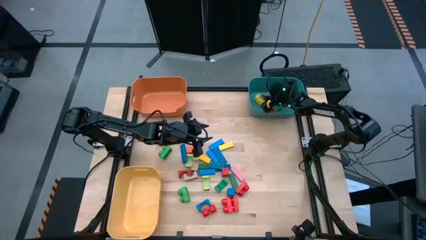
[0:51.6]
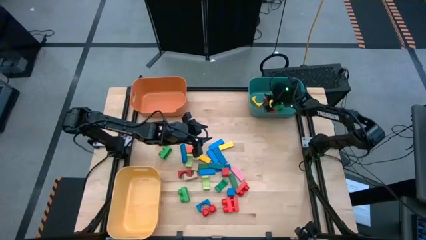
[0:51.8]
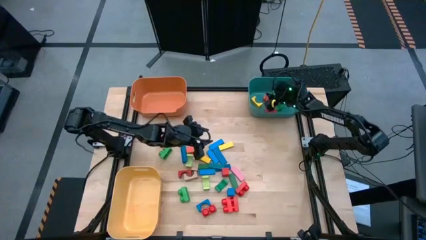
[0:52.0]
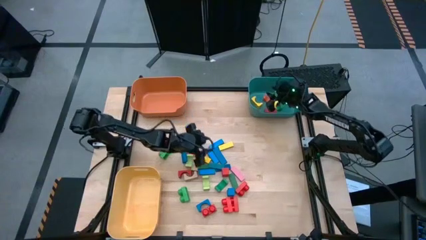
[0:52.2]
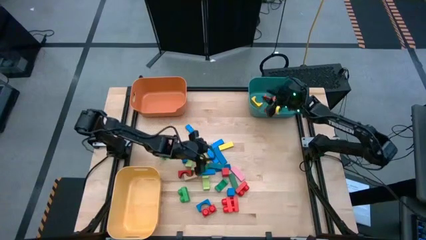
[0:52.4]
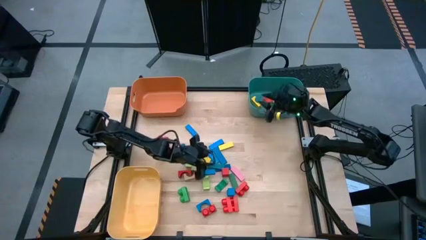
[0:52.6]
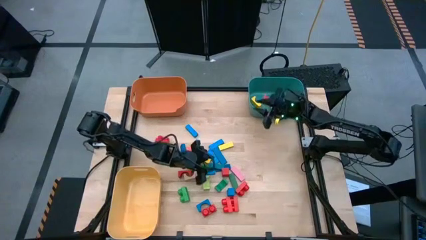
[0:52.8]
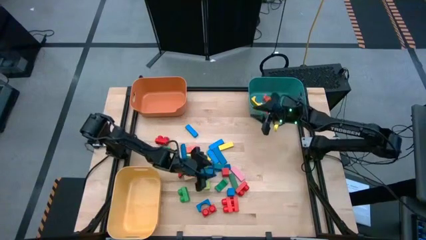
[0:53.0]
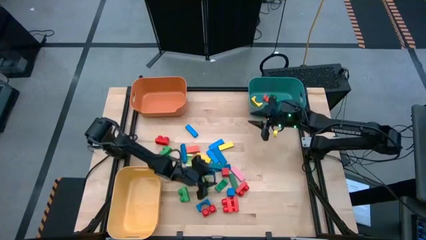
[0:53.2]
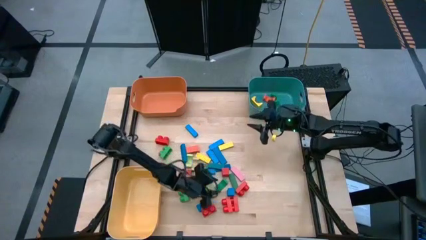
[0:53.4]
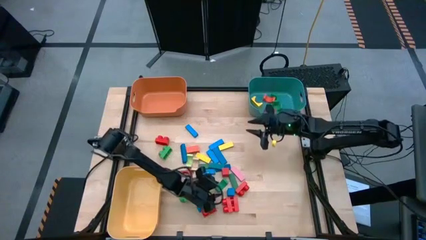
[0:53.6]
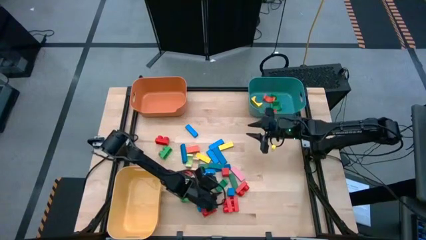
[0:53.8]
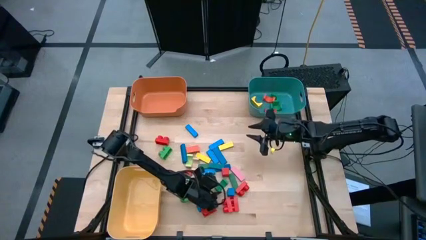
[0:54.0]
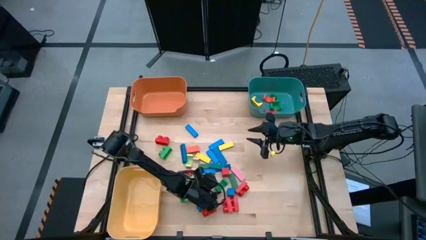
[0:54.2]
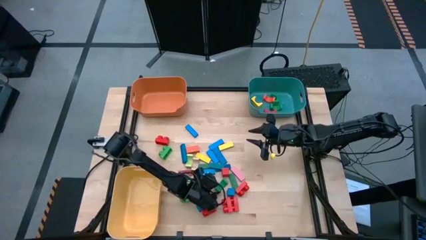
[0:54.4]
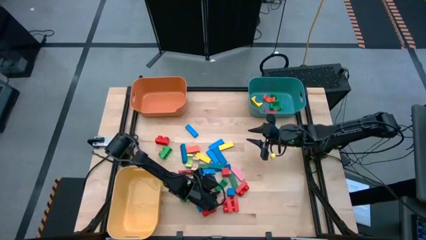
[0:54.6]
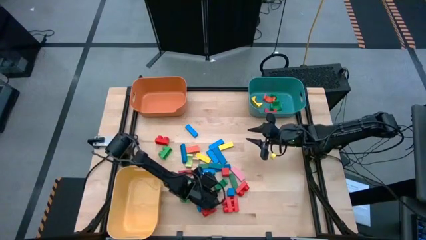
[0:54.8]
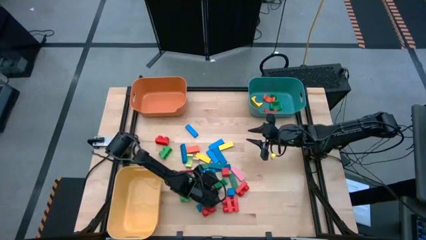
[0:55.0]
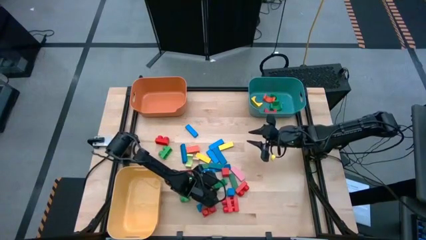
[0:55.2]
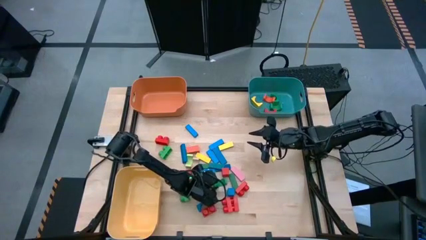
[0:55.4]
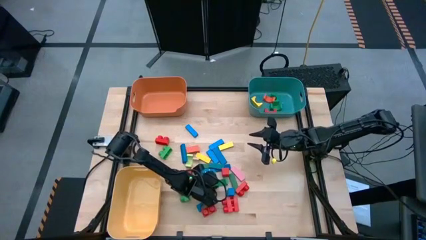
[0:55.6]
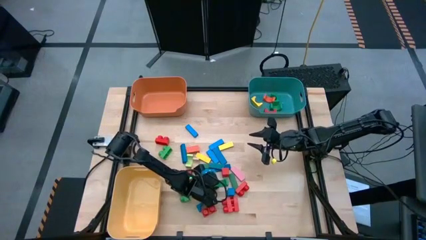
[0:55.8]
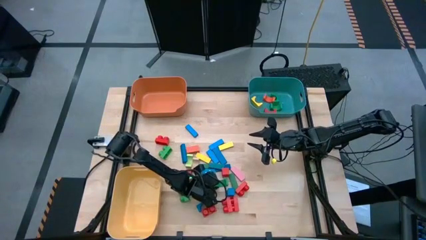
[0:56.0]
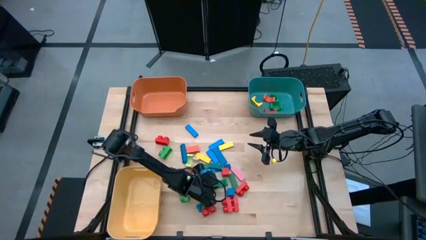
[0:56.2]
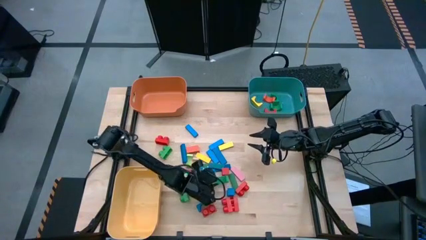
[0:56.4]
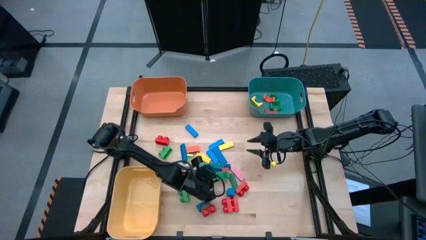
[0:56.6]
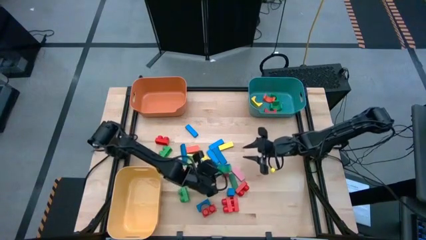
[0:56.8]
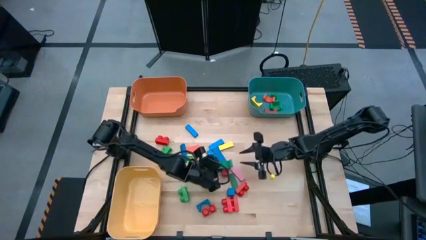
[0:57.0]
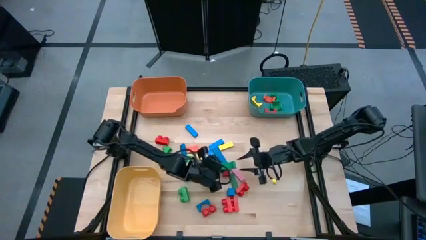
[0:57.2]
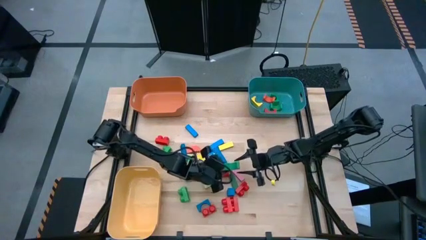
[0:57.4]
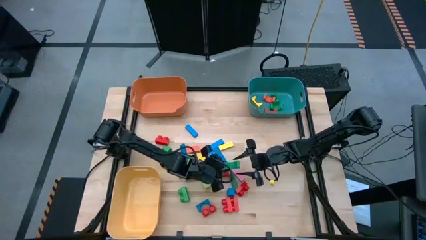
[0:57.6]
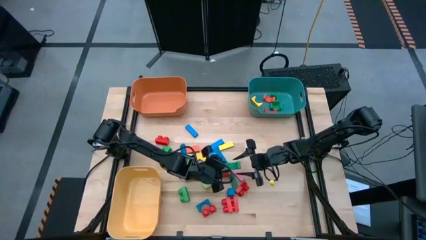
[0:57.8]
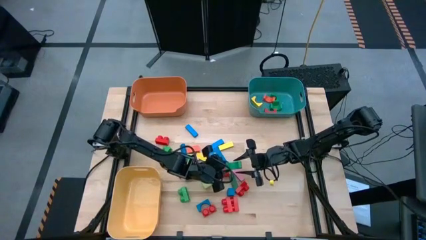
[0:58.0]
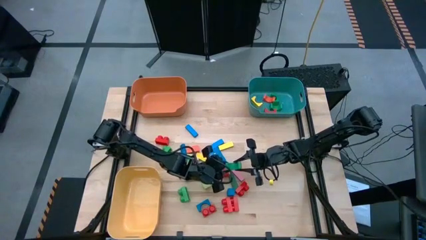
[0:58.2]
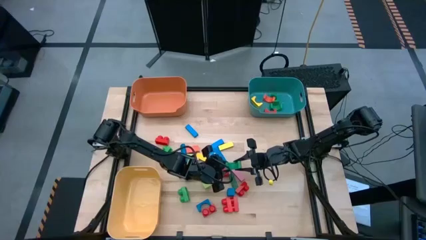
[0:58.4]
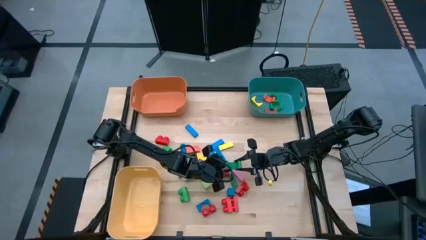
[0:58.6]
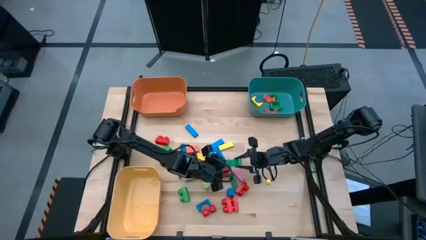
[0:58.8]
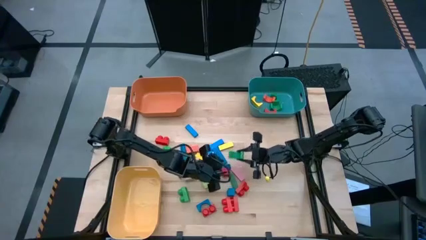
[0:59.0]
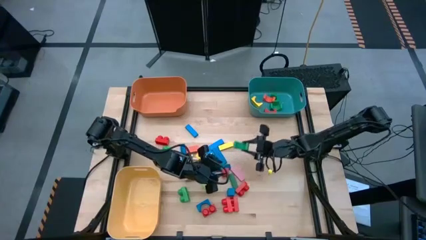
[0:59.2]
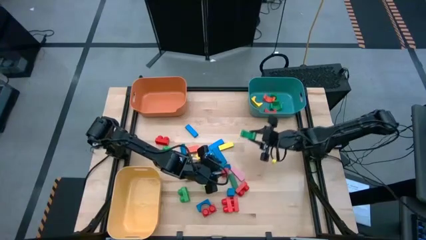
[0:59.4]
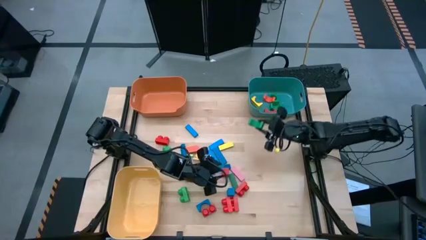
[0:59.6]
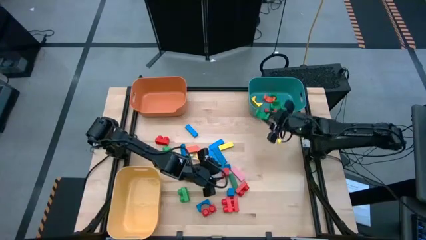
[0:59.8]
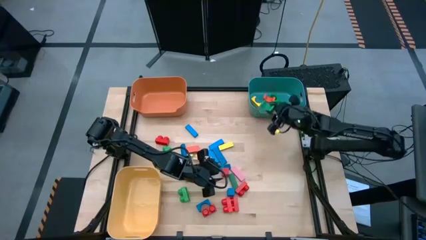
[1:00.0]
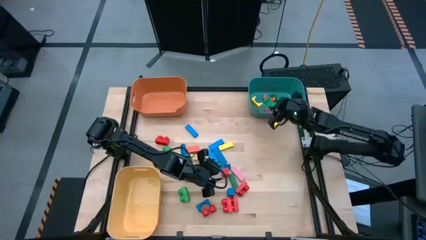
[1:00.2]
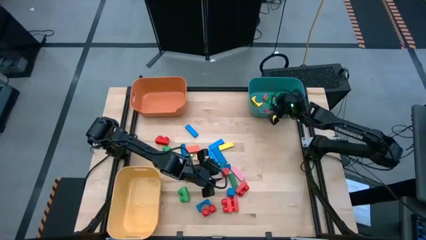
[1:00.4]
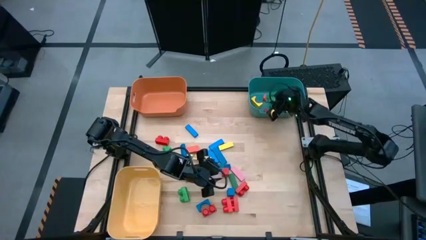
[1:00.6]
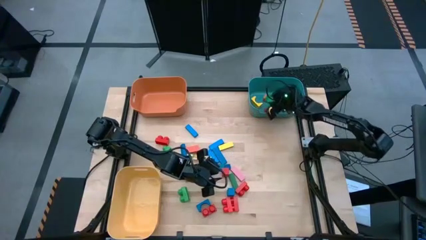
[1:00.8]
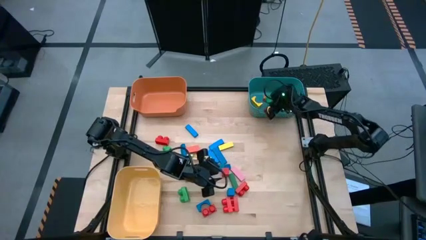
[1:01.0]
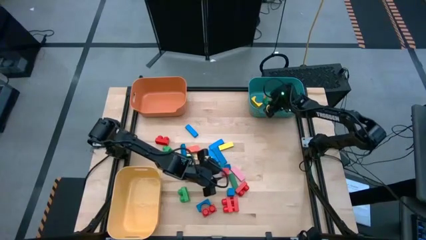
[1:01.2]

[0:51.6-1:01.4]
Task: Sort blocks by size
Put the green arch block into the blue bin

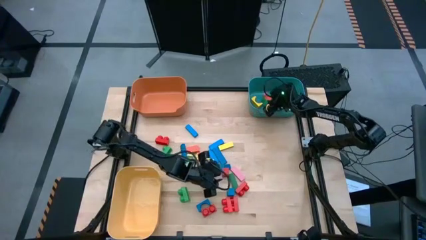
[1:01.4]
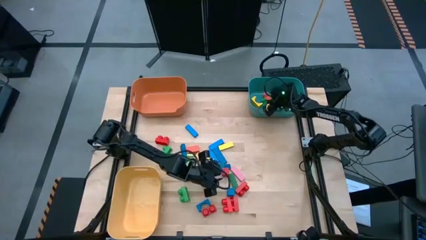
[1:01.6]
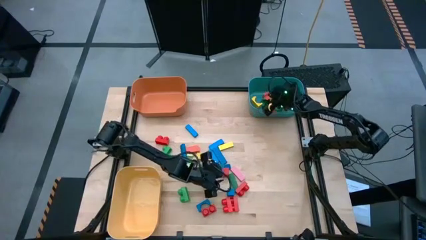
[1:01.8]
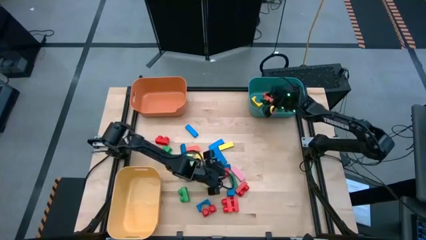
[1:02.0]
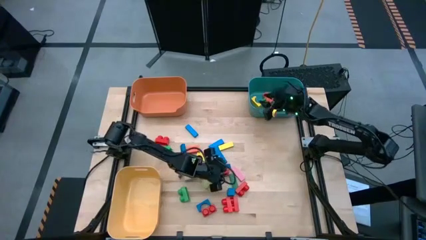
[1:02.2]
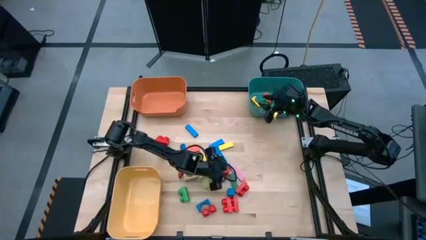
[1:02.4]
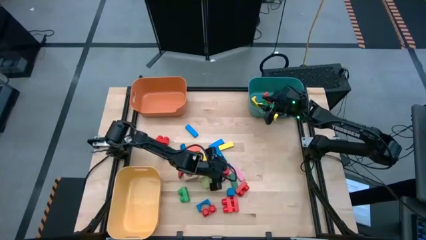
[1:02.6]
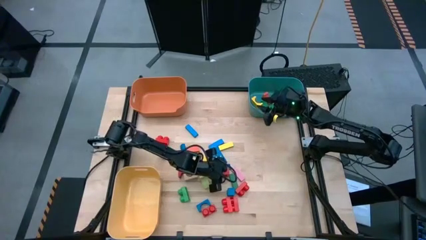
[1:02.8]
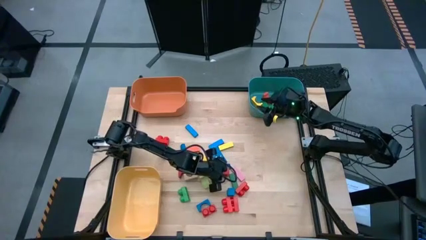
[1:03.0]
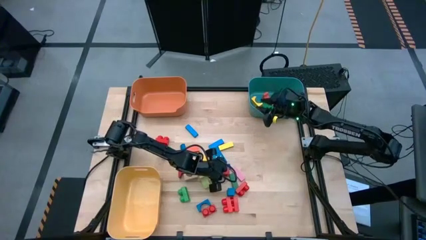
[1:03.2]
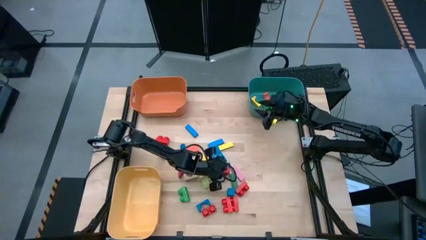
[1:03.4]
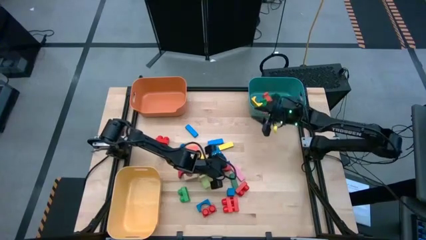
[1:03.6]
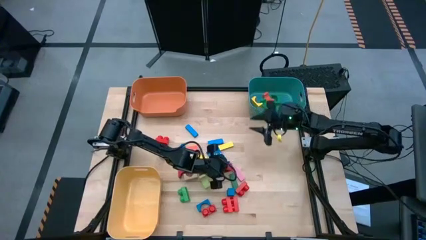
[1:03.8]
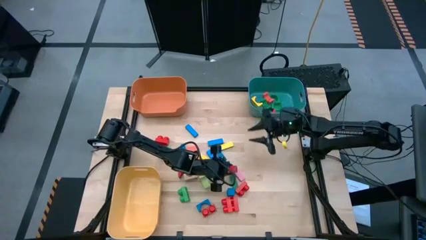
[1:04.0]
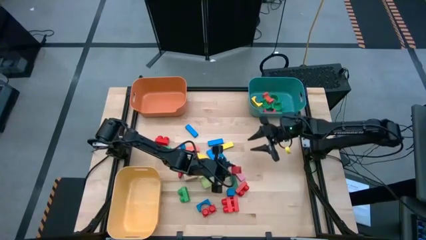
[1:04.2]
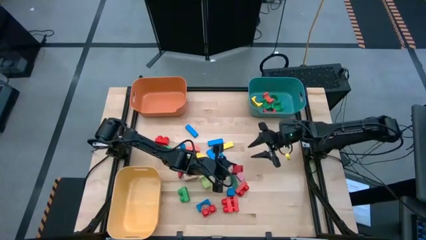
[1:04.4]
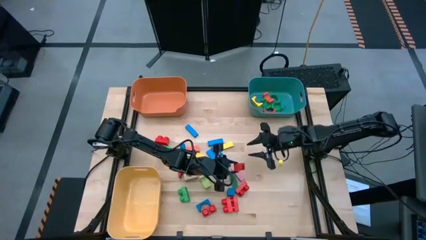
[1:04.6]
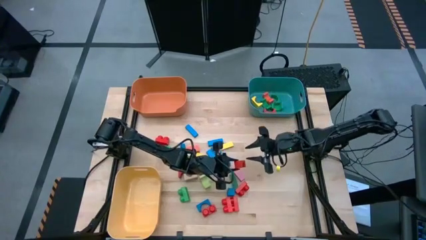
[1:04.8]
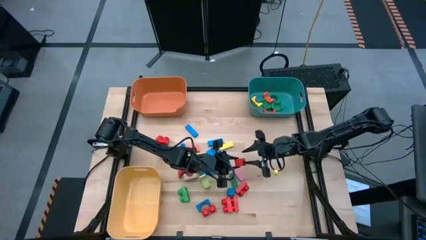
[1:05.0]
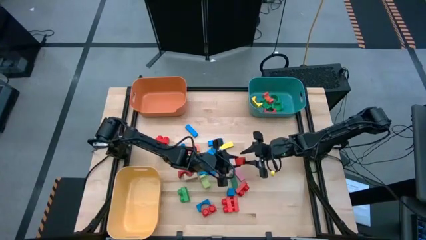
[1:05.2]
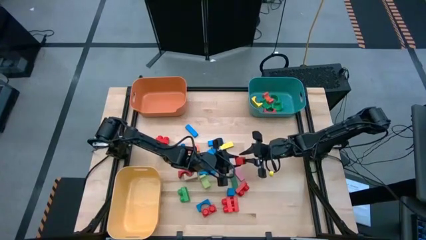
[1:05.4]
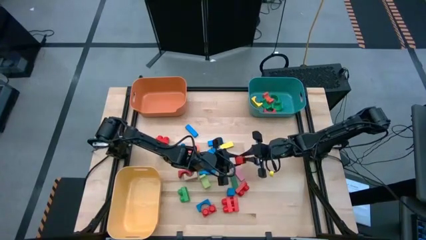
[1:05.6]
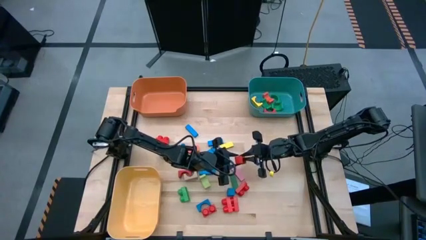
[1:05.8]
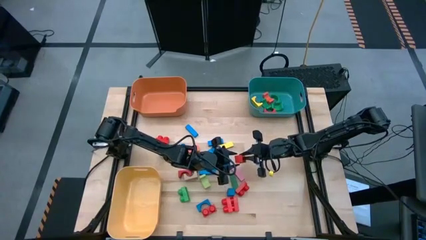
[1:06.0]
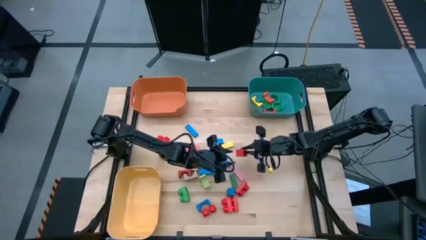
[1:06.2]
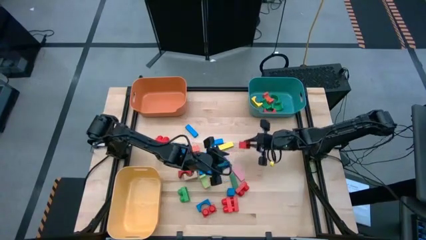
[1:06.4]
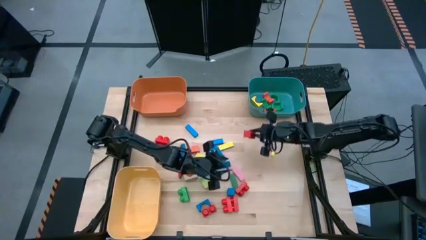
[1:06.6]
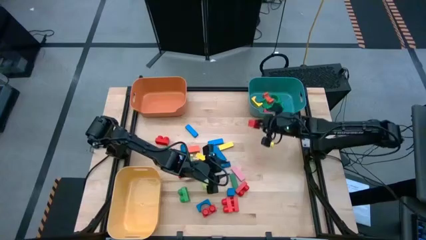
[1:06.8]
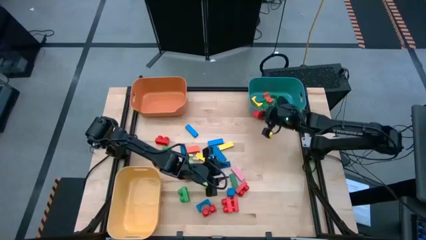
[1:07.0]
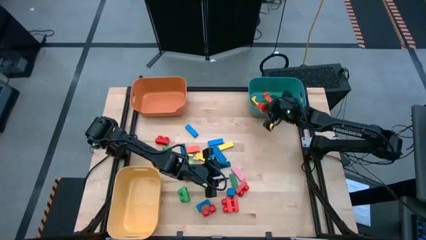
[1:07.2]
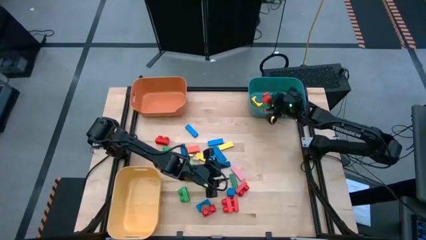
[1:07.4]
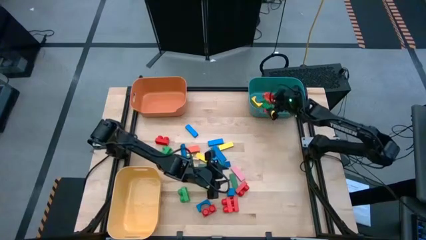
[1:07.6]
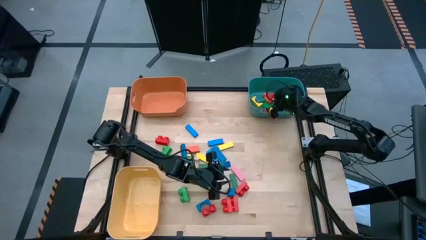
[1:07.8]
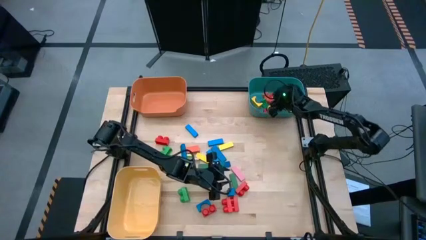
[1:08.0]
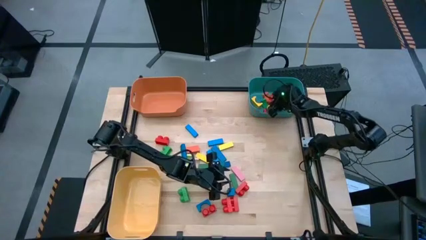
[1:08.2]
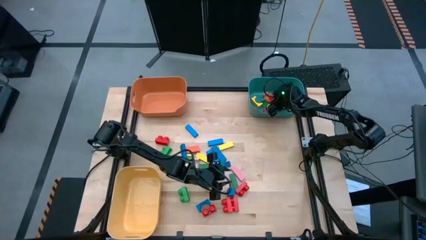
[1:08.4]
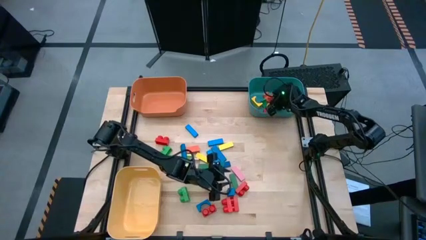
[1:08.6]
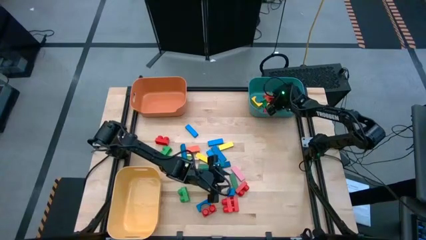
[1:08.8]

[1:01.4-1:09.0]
Put the red arch block into the blue bin
